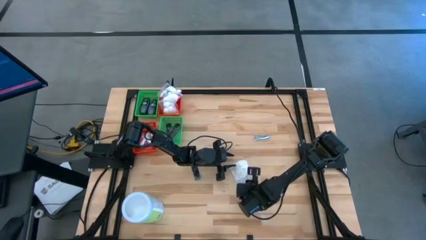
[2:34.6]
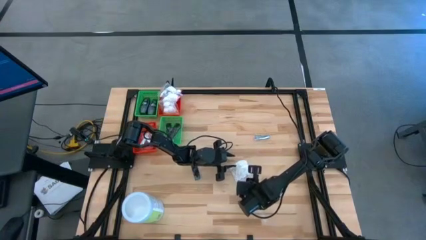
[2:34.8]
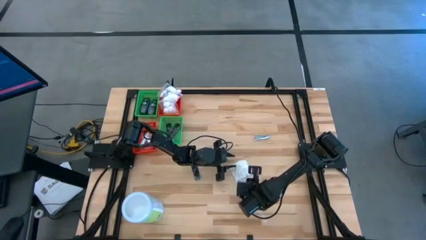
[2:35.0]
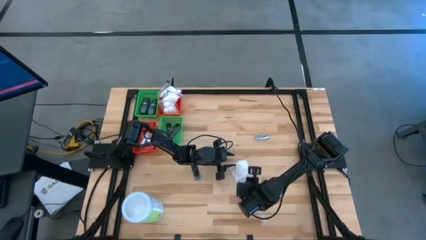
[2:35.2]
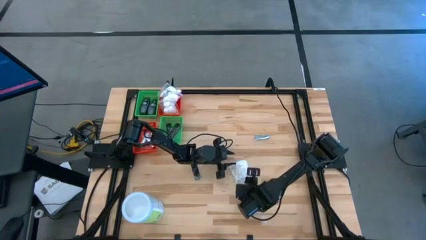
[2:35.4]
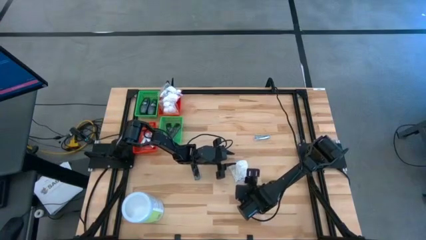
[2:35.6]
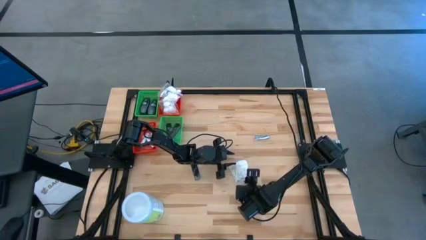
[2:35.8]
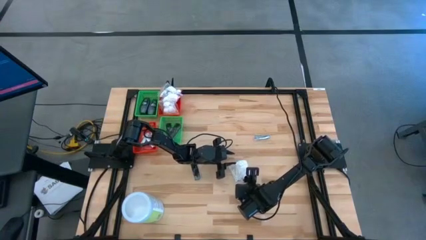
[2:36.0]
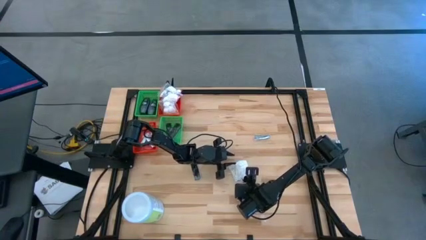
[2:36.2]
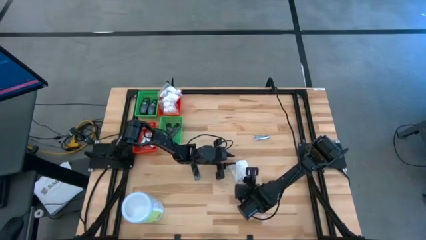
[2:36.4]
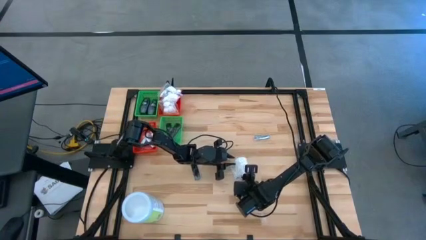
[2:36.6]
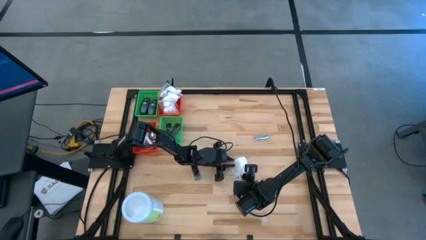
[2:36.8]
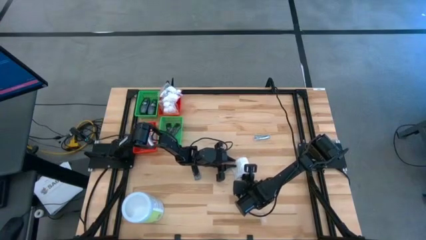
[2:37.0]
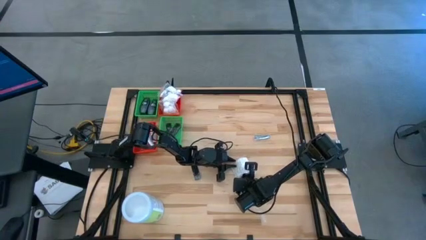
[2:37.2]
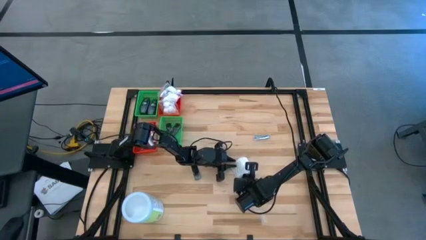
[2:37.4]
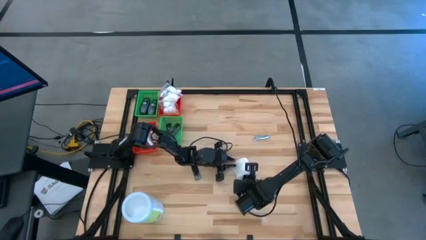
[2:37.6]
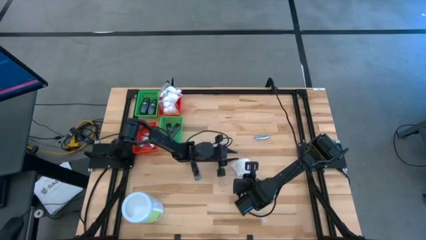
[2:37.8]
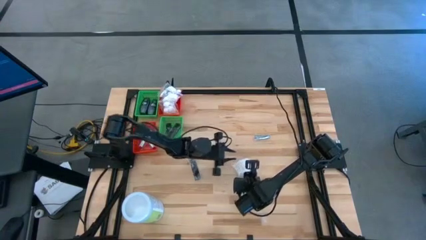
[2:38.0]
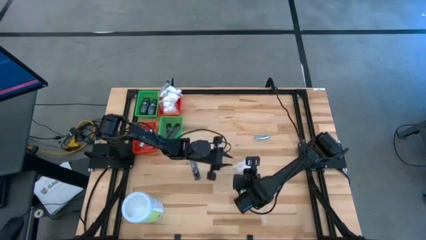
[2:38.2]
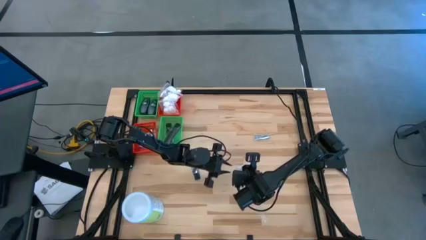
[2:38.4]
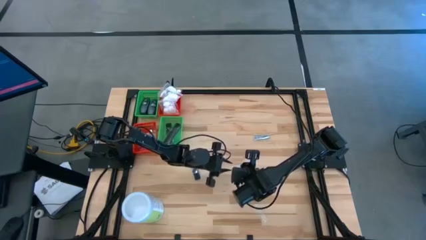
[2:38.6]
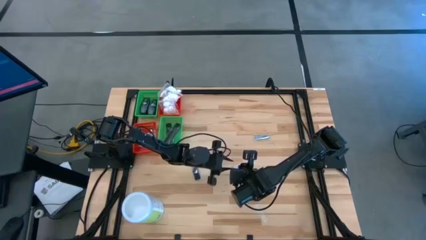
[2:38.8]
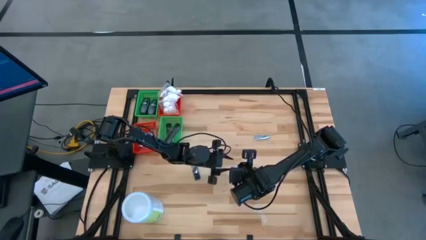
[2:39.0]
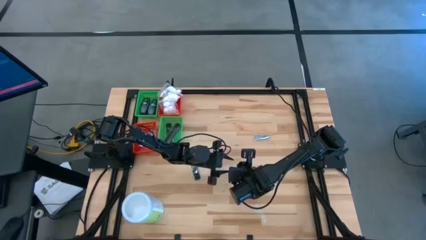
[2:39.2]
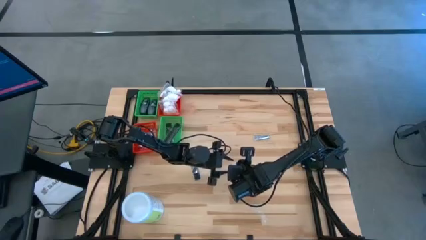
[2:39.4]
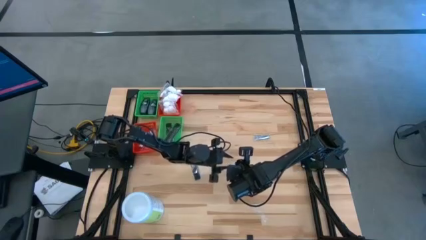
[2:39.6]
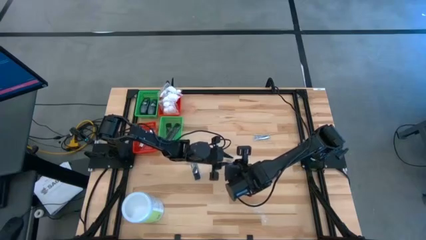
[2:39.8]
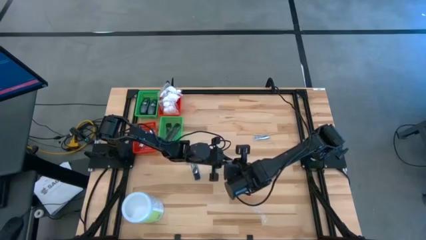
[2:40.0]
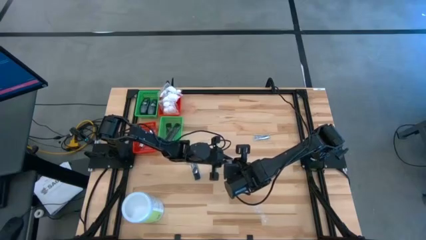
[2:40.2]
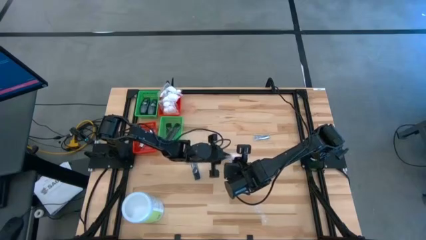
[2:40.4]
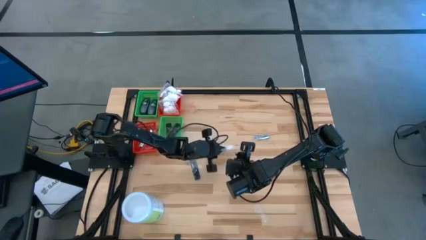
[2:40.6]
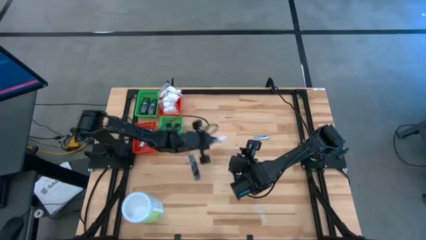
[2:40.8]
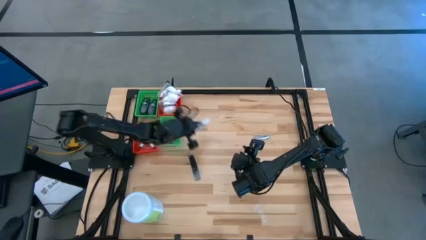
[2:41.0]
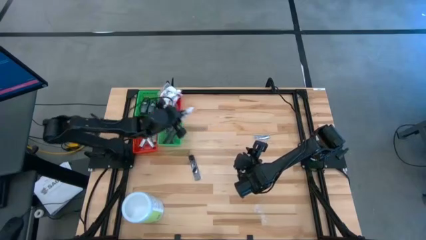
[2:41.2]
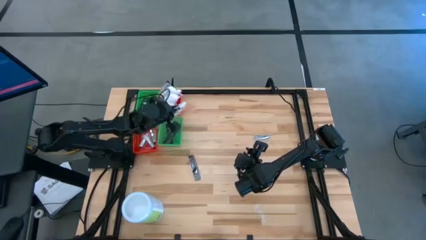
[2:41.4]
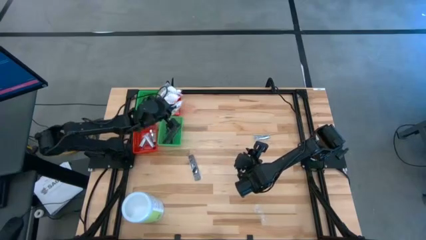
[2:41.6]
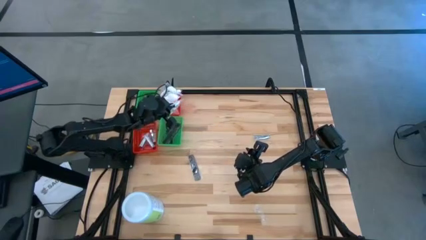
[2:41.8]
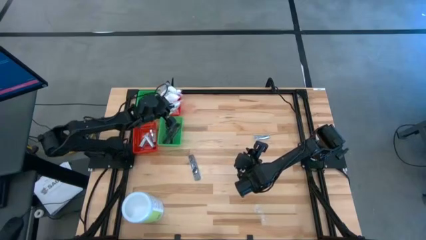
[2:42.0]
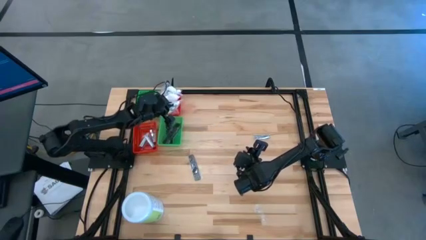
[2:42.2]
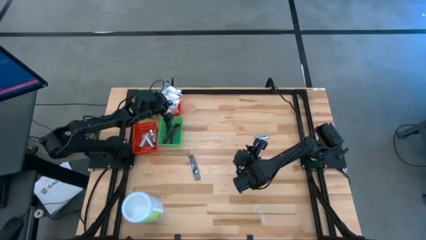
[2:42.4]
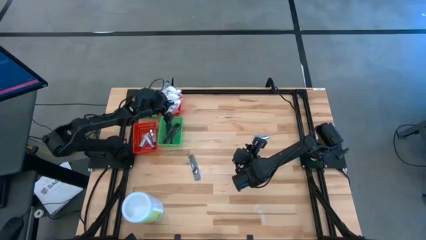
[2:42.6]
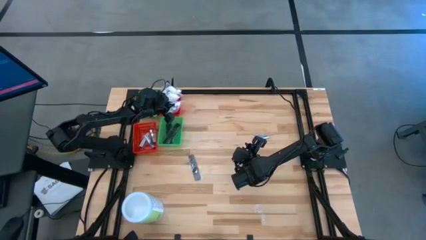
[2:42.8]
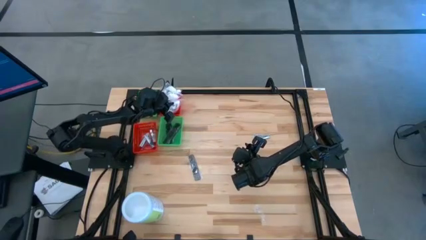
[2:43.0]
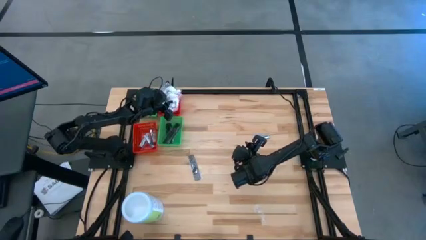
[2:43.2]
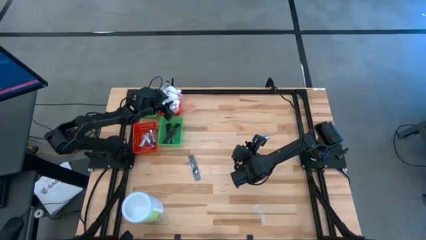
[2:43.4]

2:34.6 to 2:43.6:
Task: Pick & Place Travel size toiletries
Put the white cotton pack into the top red bin

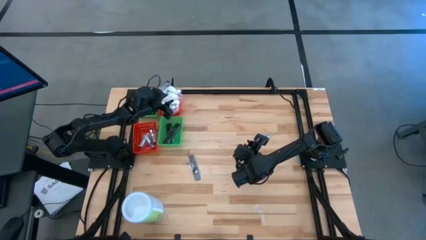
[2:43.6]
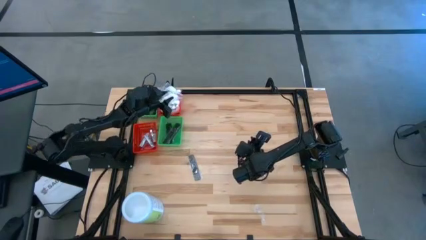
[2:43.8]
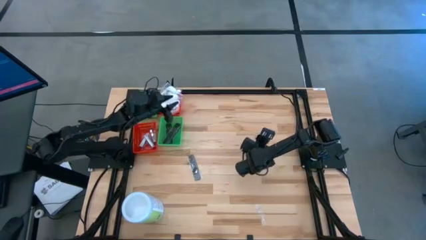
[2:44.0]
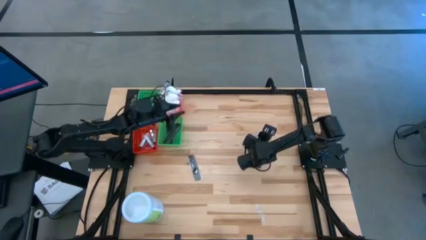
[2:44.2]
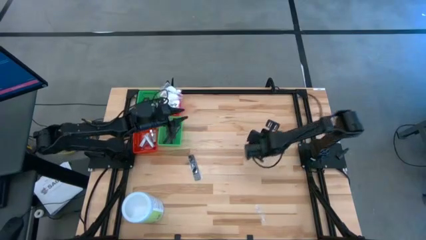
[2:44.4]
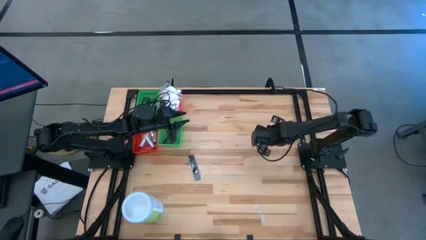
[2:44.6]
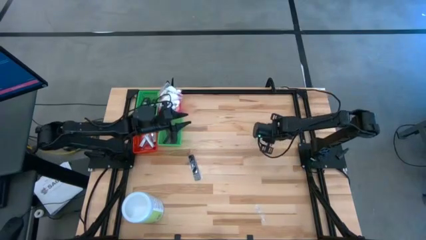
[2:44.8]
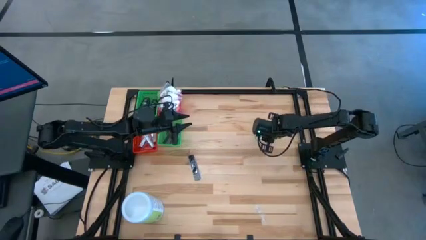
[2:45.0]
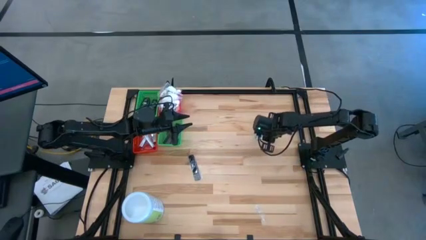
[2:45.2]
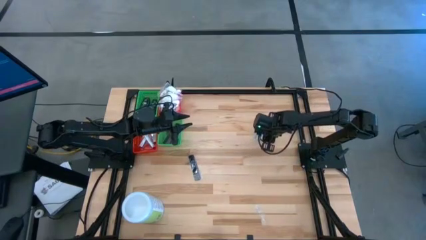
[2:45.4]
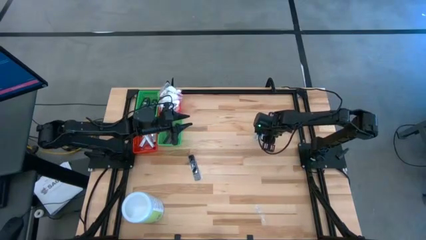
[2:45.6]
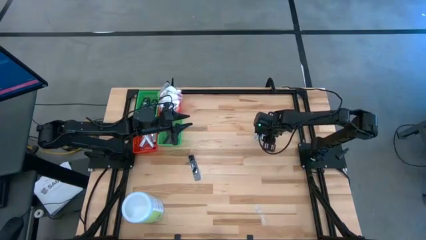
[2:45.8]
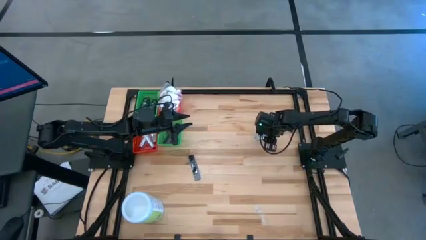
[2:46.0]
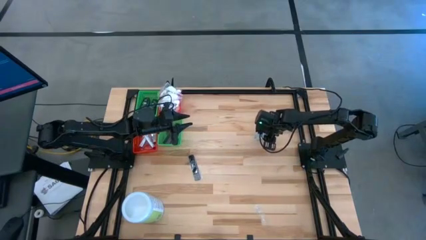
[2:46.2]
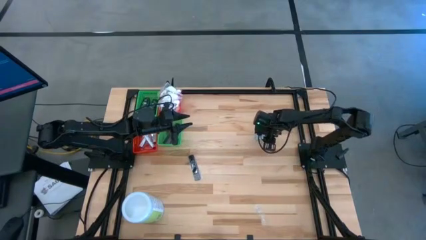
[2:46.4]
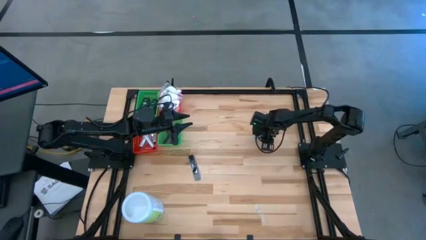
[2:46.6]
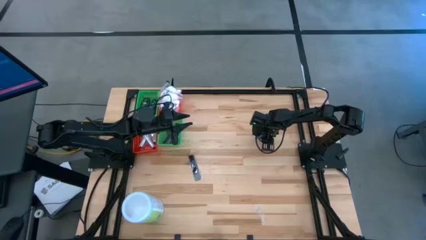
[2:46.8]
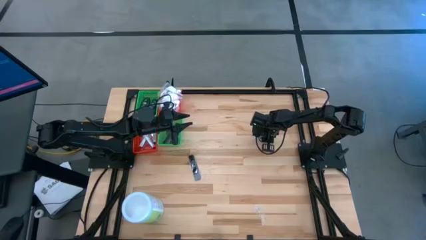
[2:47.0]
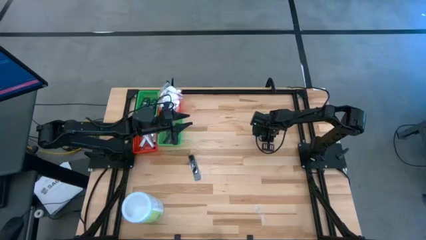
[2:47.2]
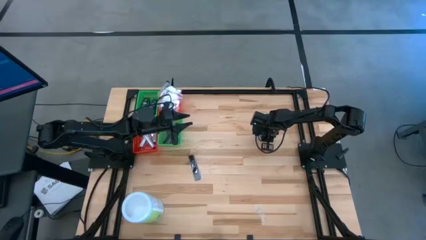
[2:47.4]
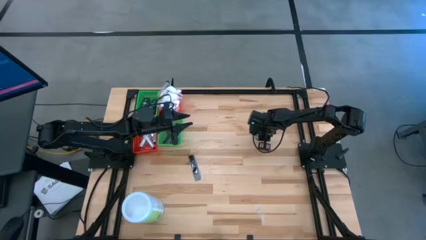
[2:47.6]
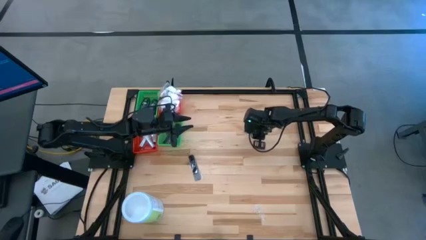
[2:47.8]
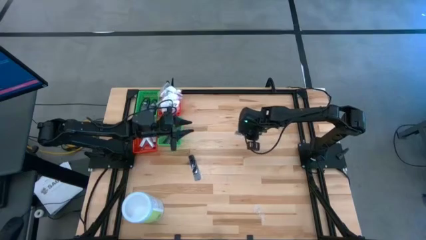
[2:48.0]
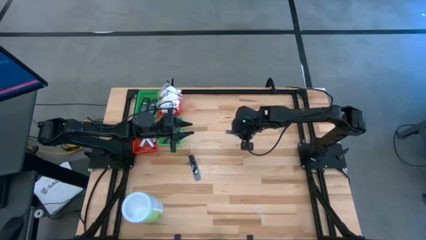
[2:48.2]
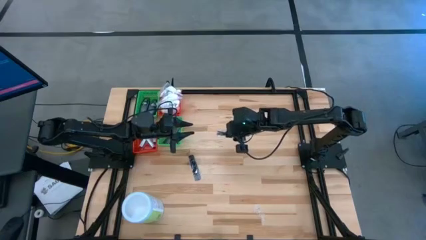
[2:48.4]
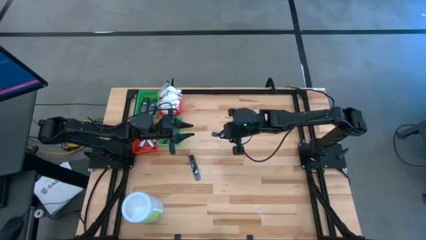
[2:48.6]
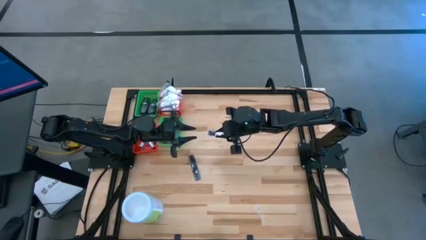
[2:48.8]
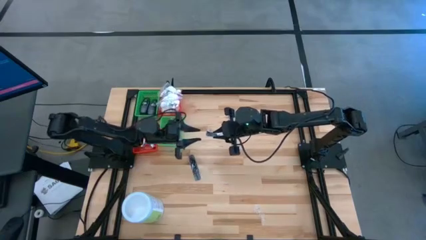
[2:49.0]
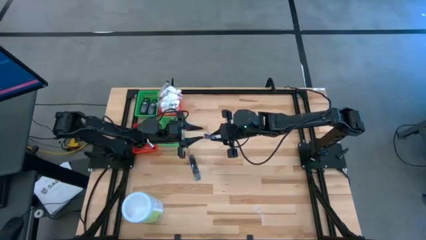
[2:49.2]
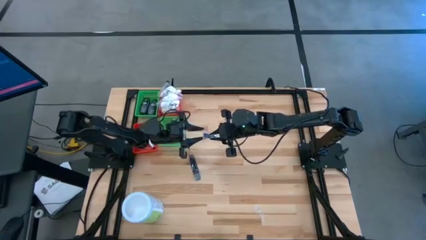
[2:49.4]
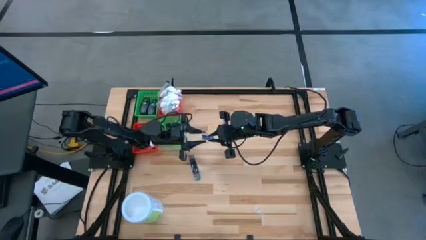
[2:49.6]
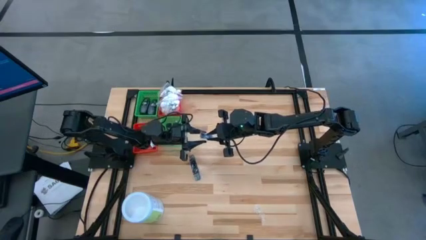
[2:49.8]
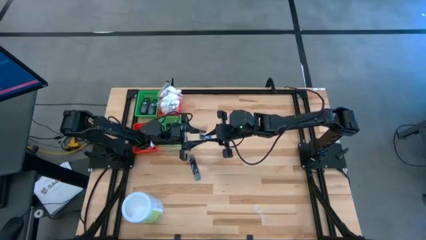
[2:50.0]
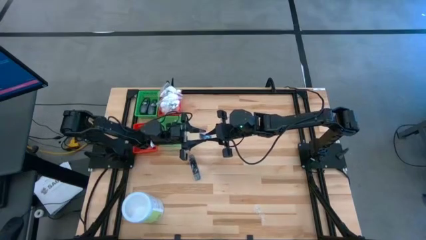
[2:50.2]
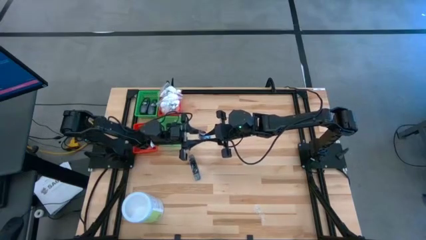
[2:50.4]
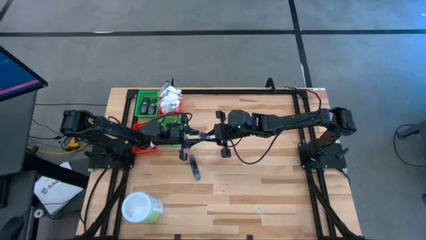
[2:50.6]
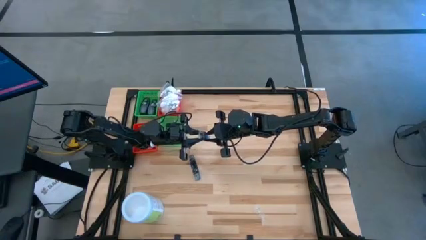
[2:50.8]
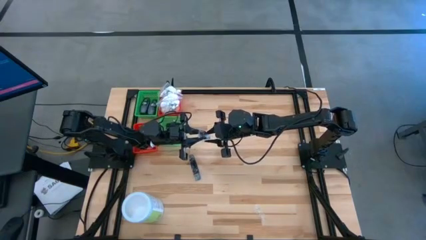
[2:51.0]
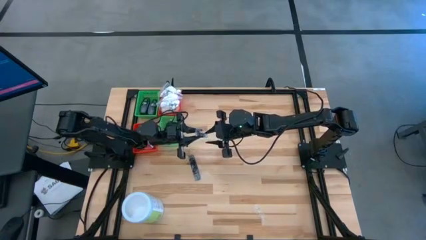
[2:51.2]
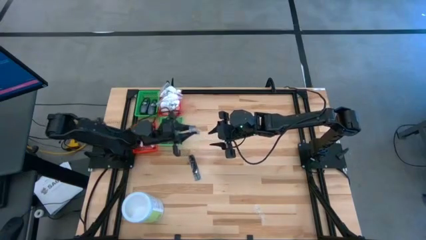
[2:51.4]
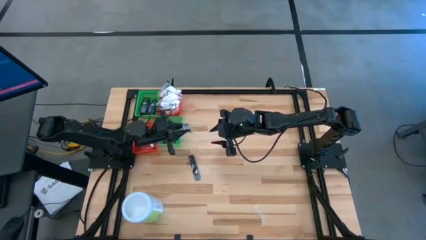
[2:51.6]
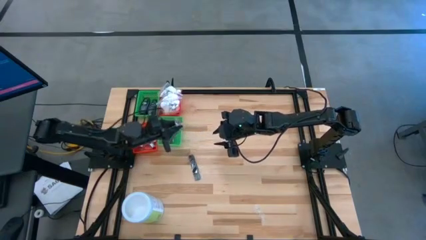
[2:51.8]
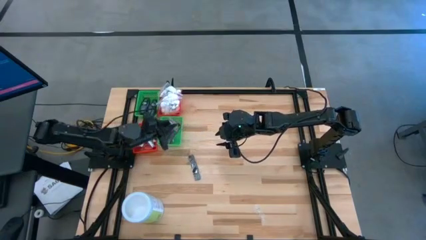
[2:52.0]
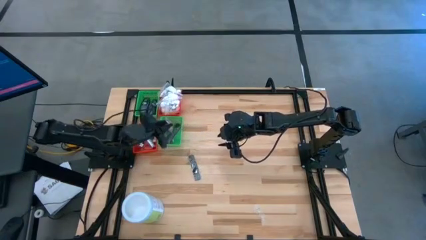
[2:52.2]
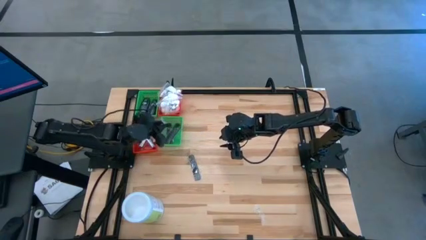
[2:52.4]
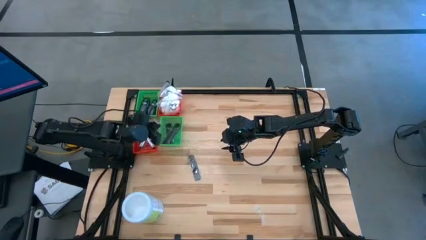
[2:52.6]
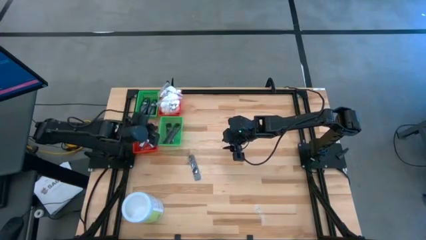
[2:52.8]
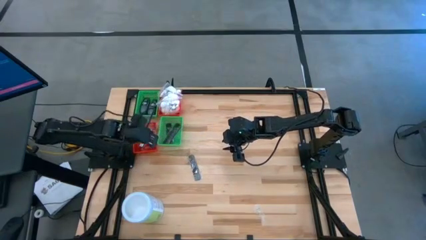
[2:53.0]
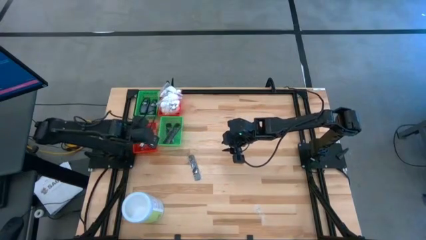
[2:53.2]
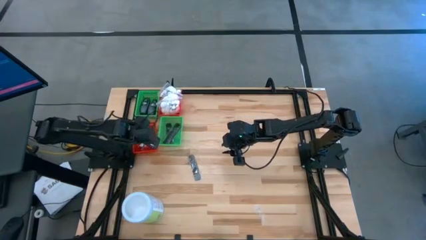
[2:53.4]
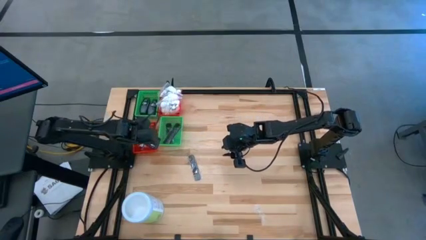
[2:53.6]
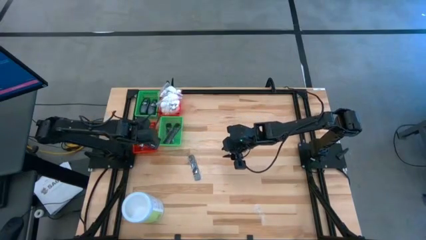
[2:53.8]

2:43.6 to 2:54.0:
Put the silver nail cutter into the bottom red bin
